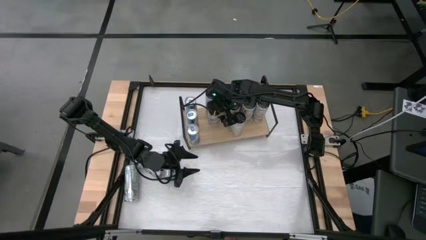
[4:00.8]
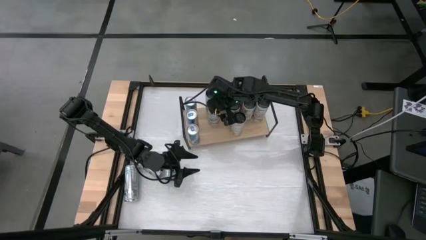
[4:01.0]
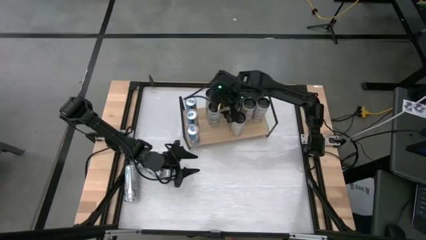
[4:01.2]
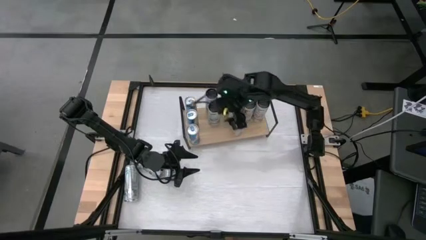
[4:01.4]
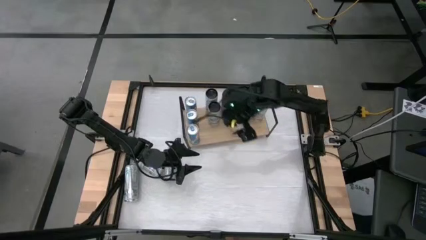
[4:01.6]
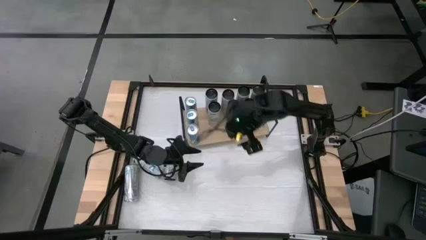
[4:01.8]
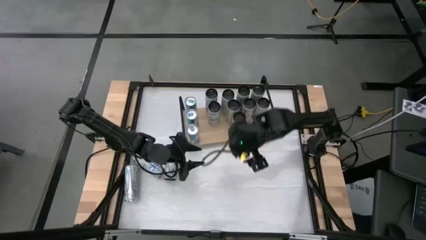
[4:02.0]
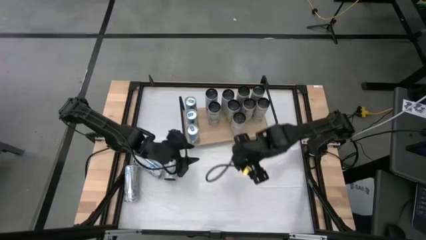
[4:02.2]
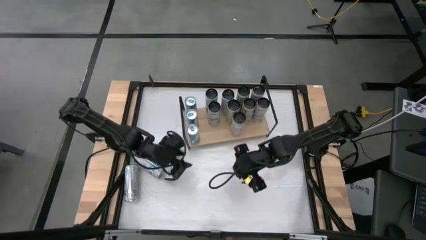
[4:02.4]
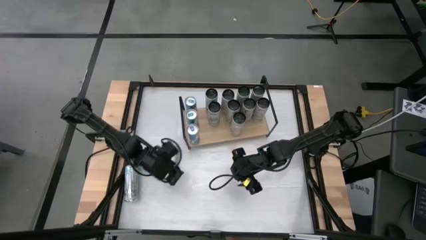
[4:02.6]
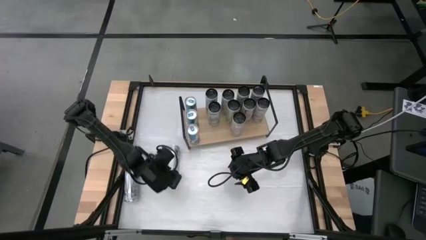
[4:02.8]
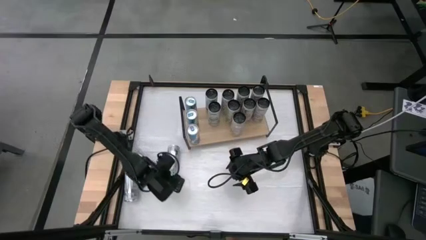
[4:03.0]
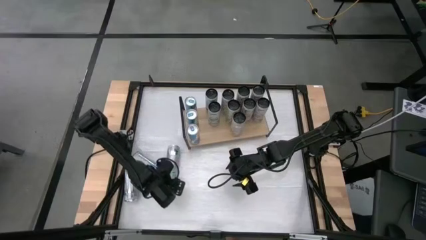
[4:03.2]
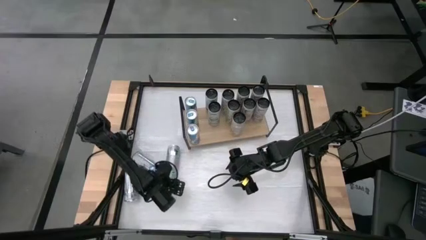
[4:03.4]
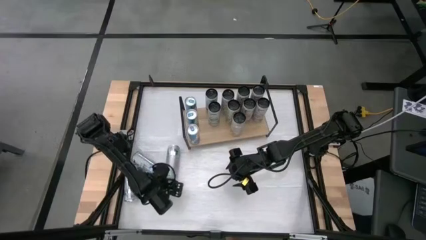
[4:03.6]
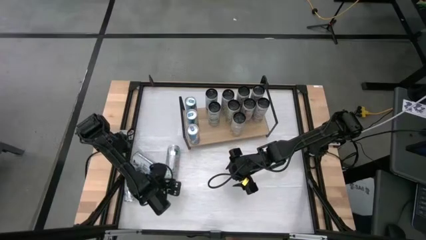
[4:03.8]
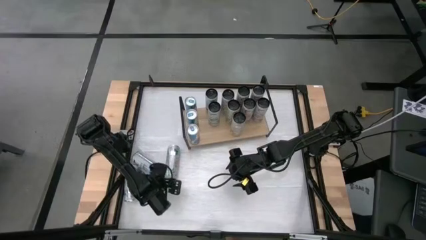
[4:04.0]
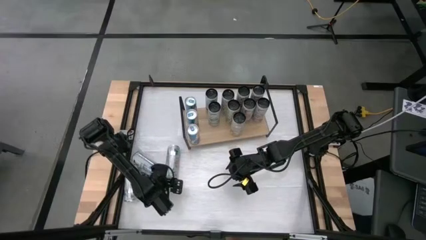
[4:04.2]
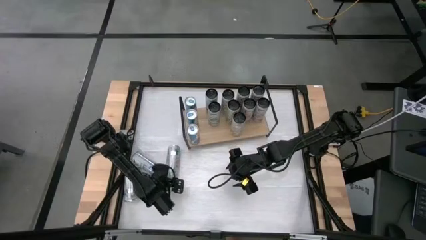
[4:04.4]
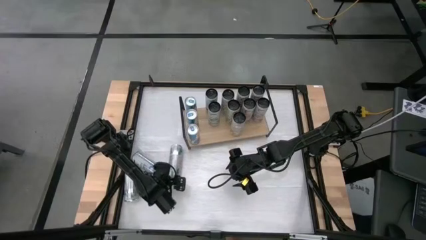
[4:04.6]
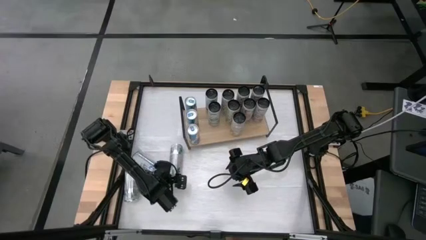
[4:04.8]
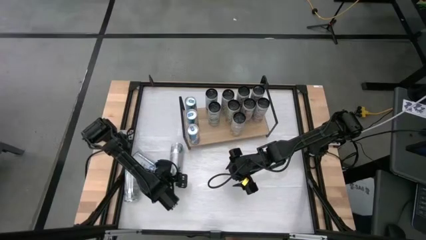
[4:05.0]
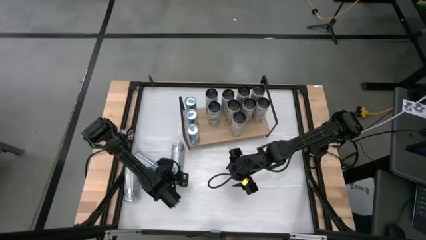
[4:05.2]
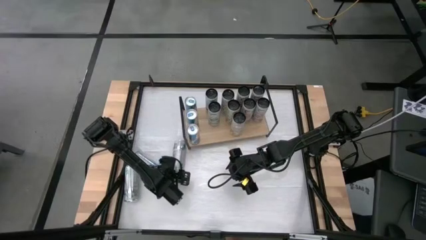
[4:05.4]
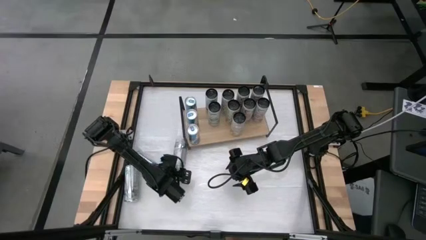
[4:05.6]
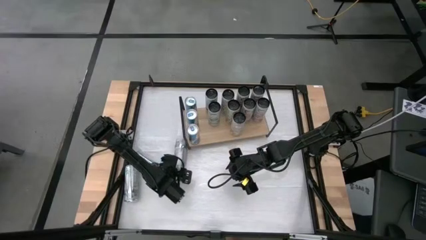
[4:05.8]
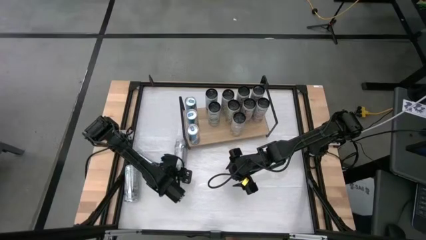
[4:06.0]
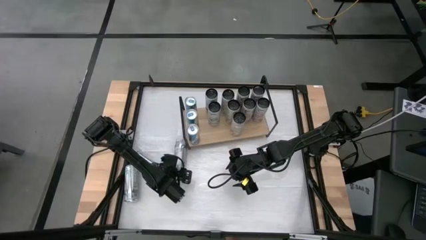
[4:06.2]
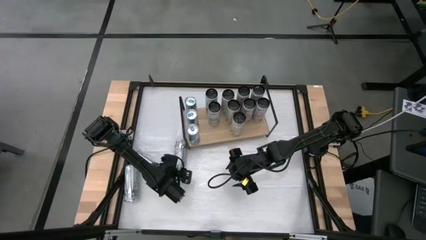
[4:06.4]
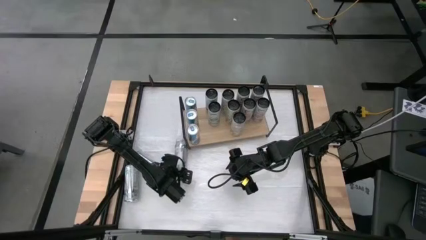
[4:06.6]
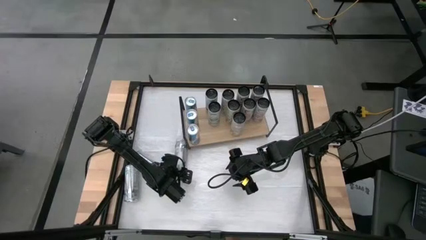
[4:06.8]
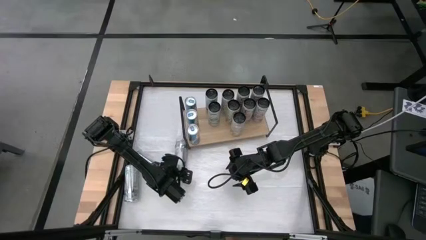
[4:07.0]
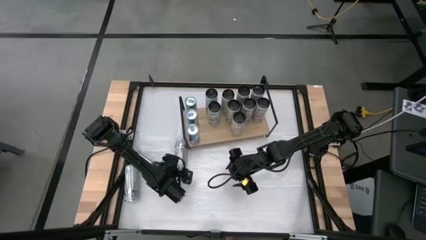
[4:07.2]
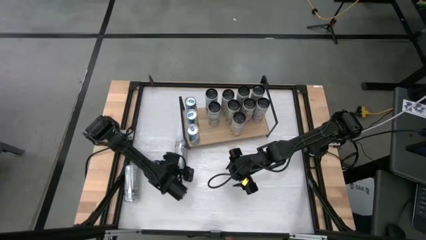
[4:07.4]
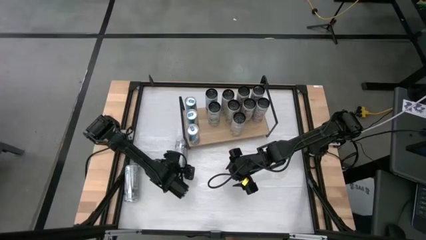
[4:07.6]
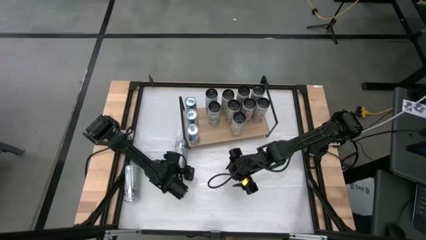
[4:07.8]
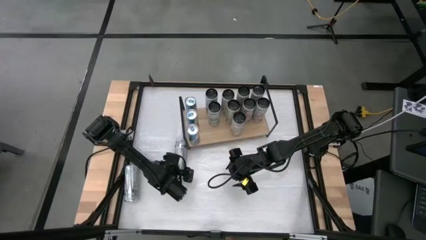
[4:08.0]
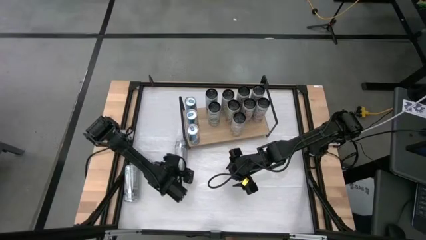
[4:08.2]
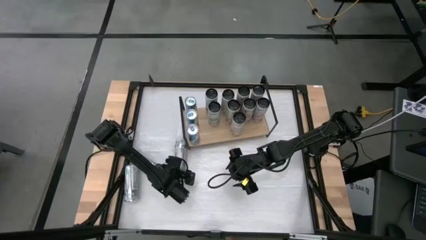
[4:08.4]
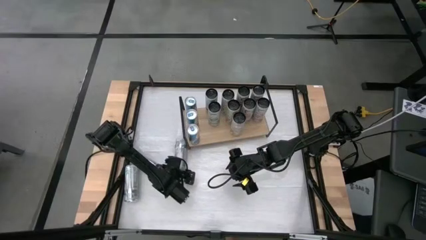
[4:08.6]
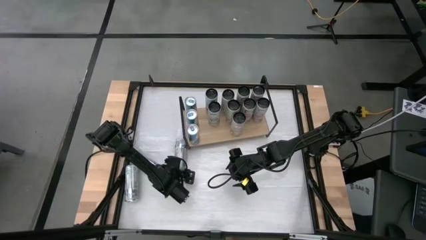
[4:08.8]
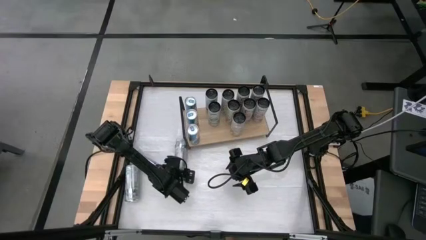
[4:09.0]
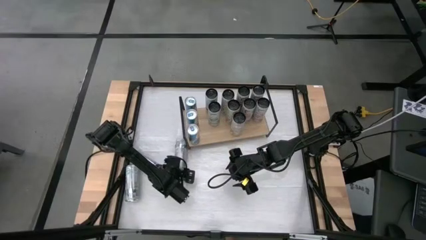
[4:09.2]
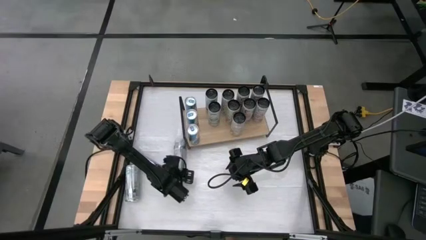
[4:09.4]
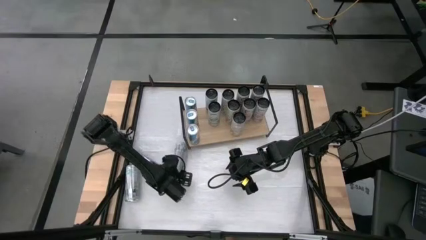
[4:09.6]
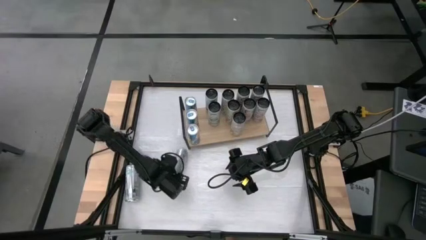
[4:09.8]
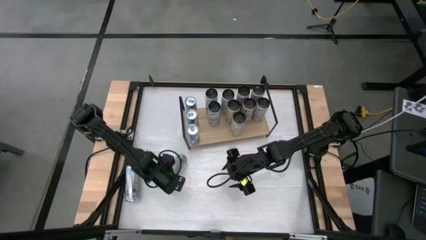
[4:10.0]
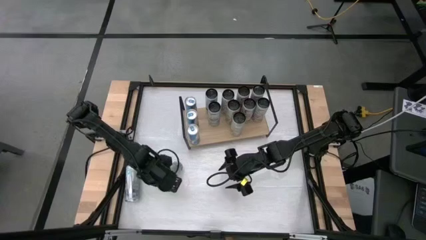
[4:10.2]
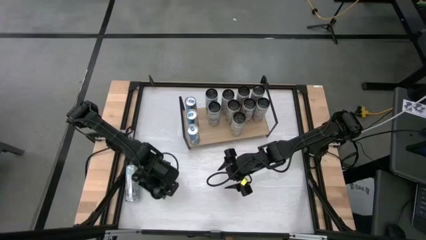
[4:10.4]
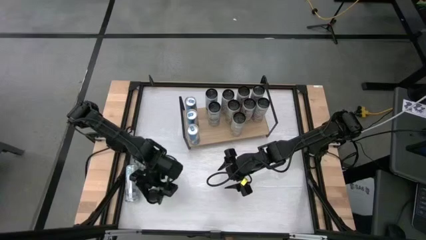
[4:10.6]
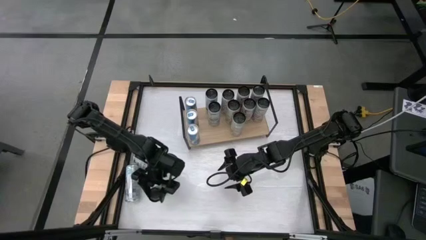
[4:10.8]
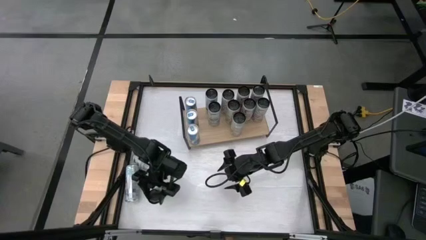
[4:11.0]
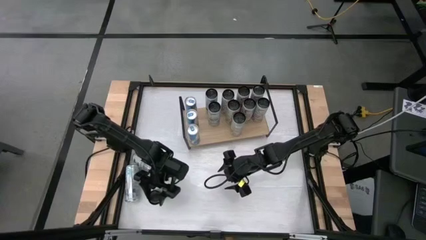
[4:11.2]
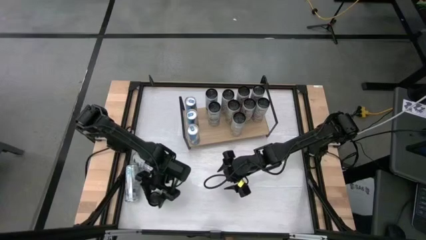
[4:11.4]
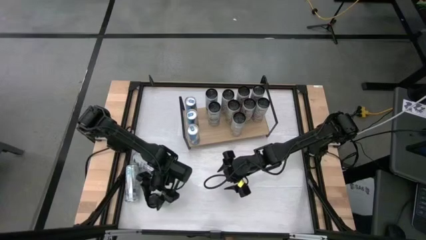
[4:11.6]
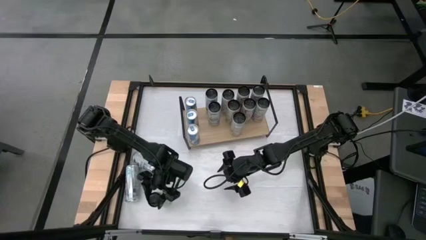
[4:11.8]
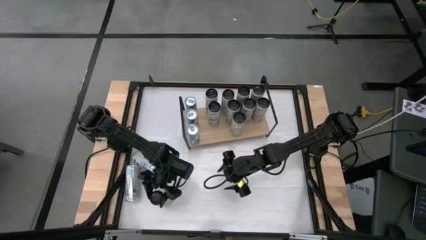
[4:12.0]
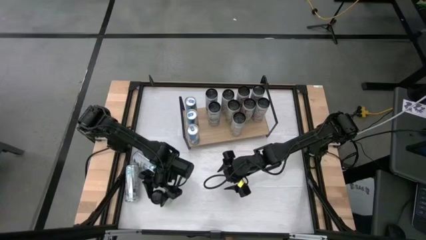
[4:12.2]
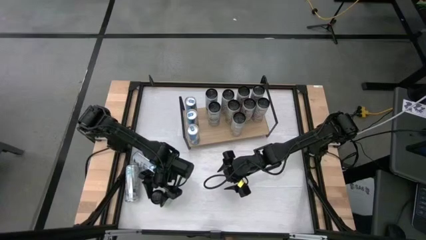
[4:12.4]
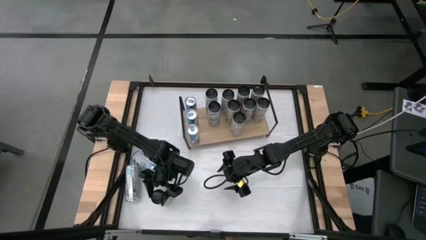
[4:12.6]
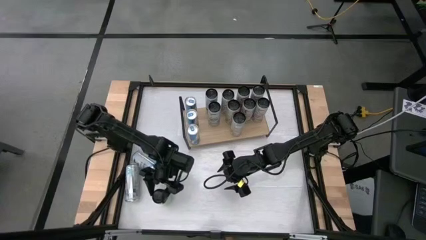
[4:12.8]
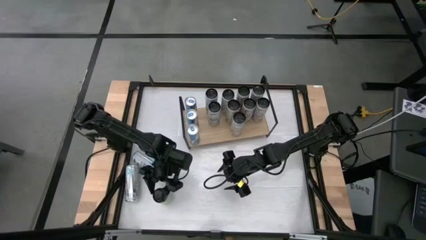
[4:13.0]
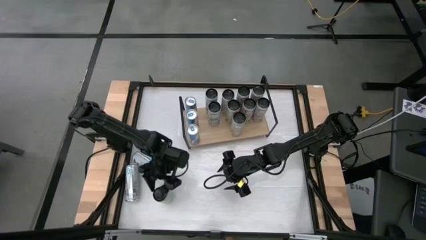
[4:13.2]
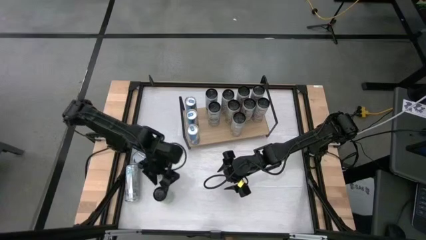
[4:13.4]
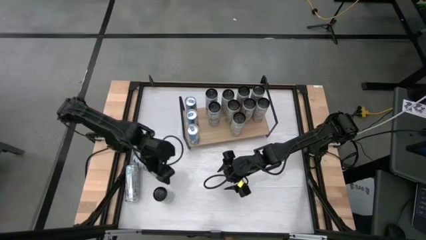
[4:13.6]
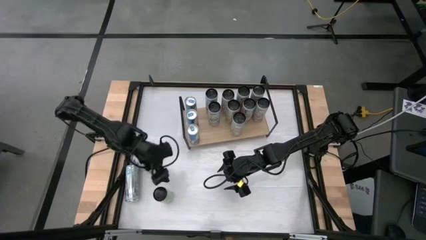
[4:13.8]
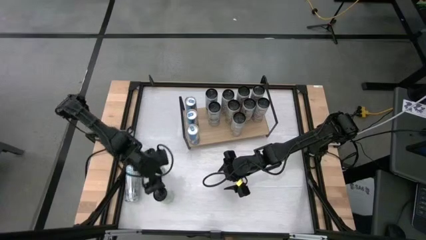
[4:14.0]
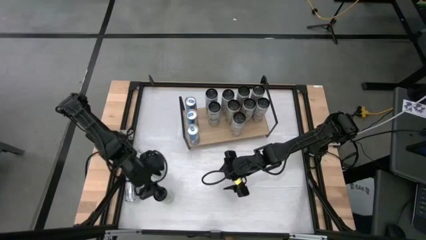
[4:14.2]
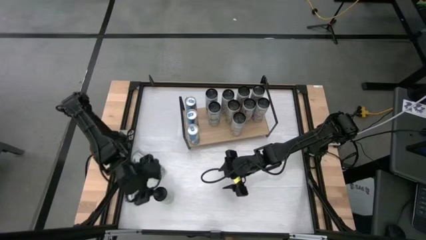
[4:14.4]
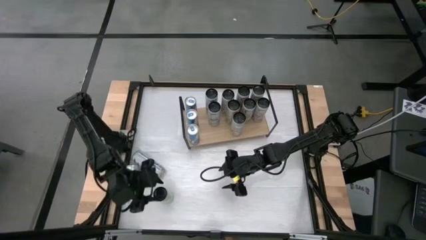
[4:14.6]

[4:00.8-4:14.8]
Task: Place canned beverage on shelf
Put the white-pink soda can on the shelf aligned with the other white-pink soda can

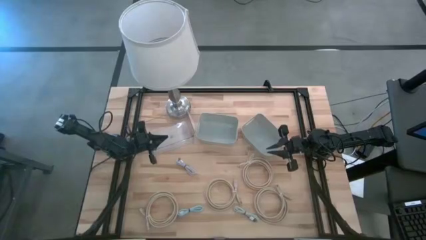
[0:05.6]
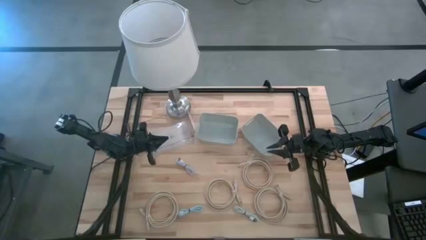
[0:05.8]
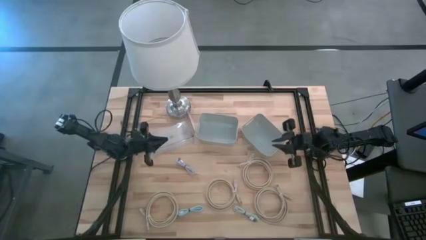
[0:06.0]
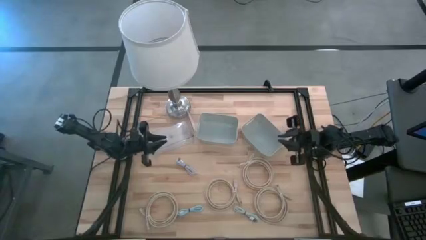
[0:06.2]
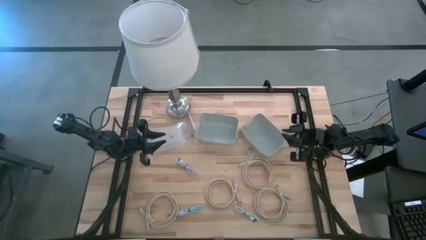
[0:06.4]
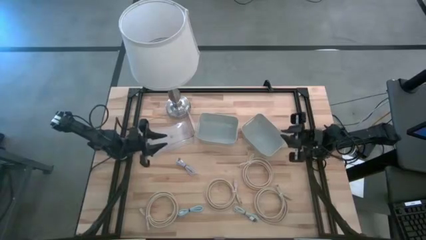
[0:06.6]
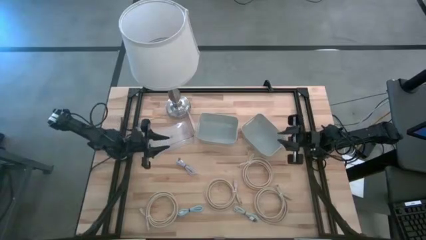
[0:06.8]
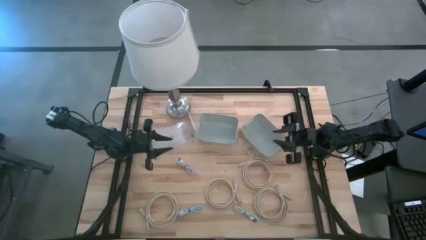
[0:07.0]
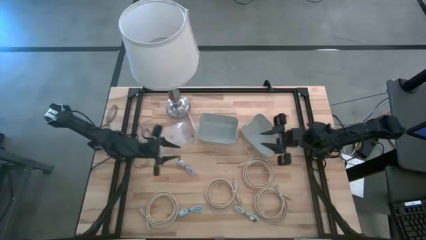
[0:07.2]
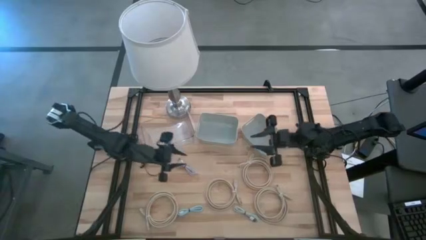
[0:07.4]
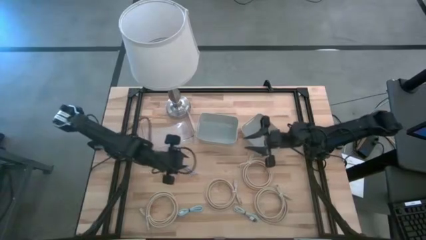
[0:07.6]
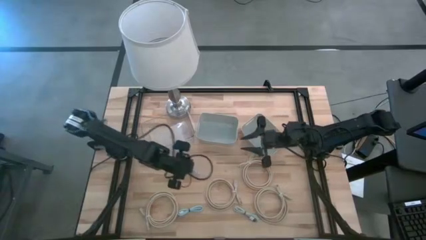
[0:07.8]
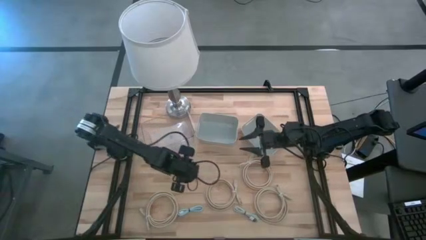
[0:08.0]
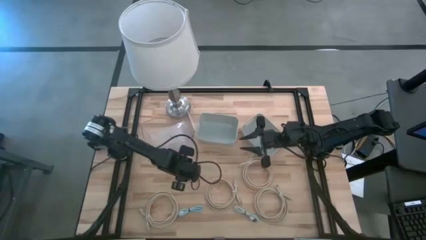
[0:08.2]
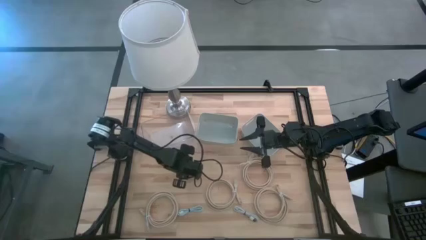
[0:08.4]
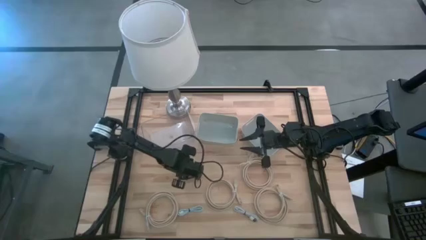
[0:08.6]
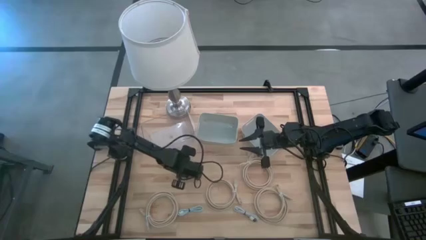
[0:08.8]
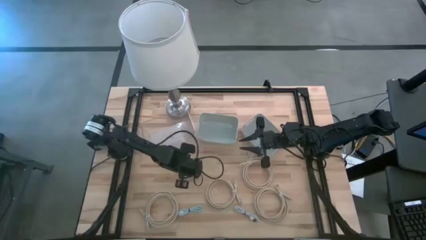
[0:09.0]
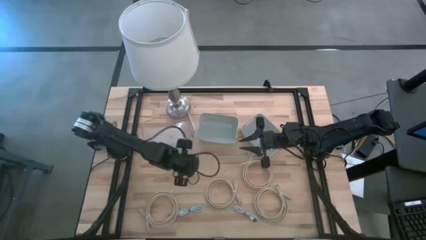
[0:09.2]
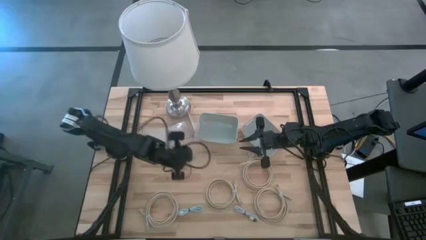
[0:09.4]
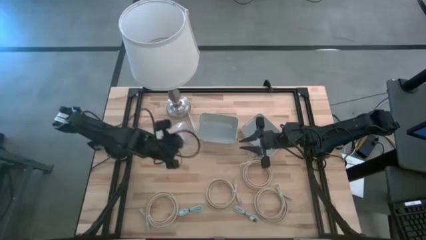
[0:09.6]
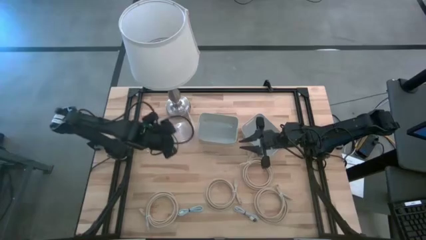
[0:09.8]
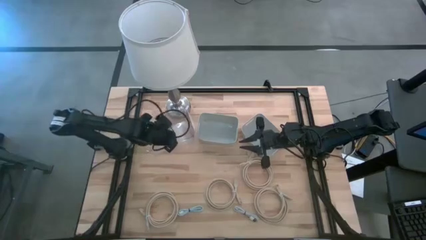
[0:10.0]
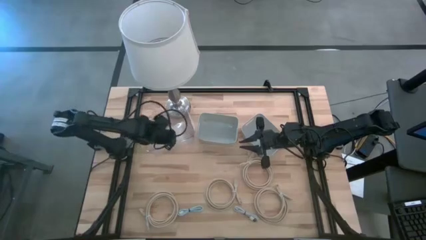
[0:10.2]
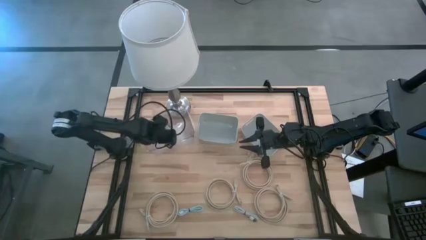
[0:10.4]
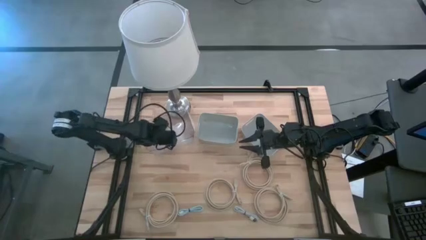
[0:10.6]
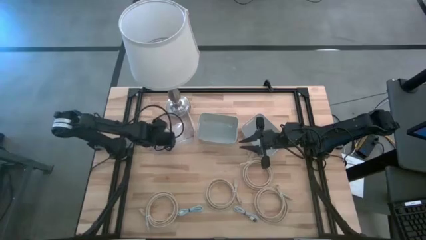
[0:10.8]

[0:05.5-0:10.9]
Task: Pick & Place USB Port
Put the purple usb cable into the transparent bin
